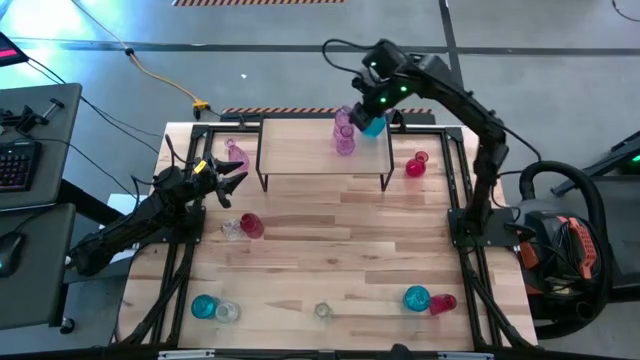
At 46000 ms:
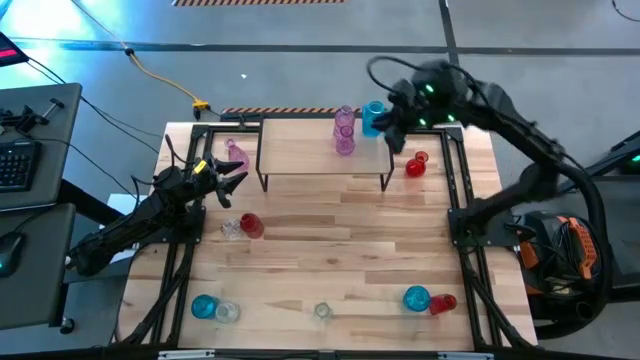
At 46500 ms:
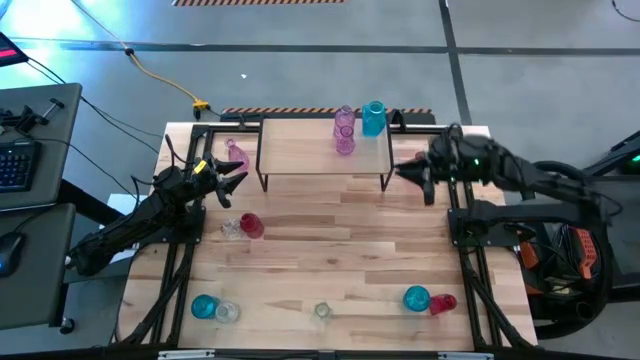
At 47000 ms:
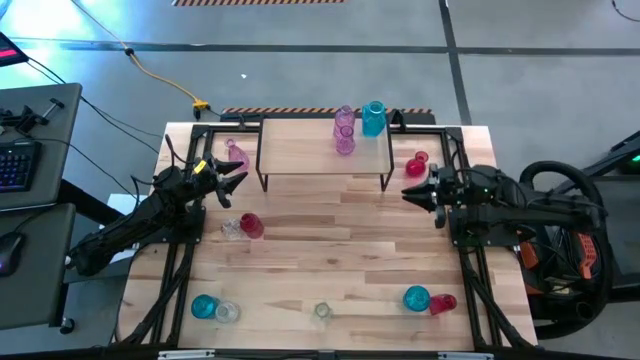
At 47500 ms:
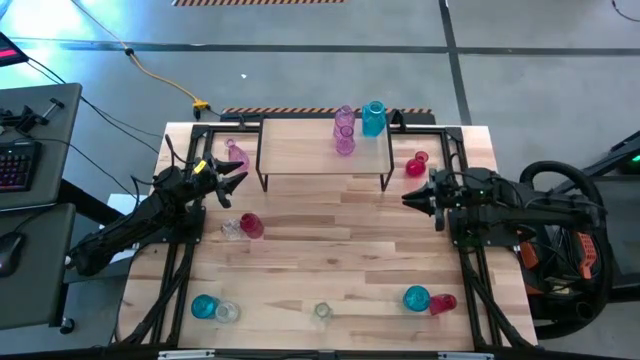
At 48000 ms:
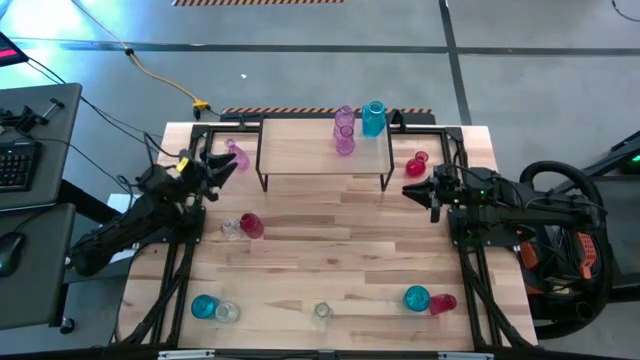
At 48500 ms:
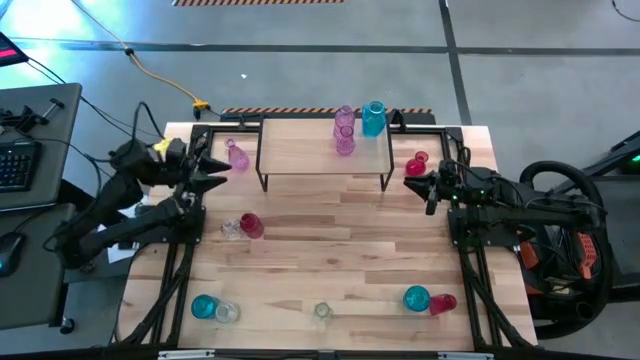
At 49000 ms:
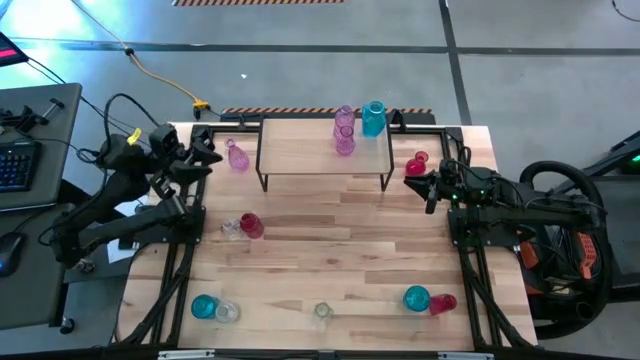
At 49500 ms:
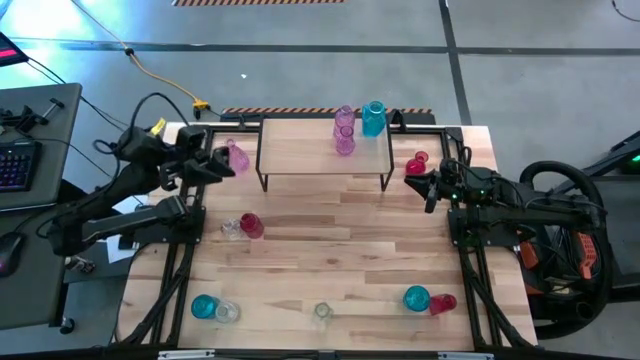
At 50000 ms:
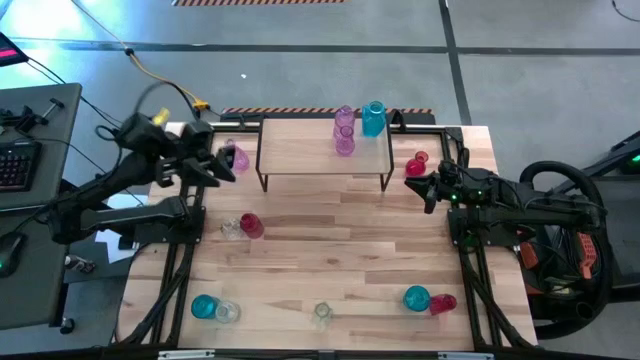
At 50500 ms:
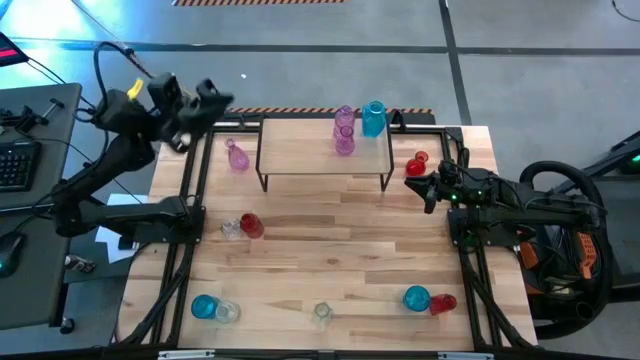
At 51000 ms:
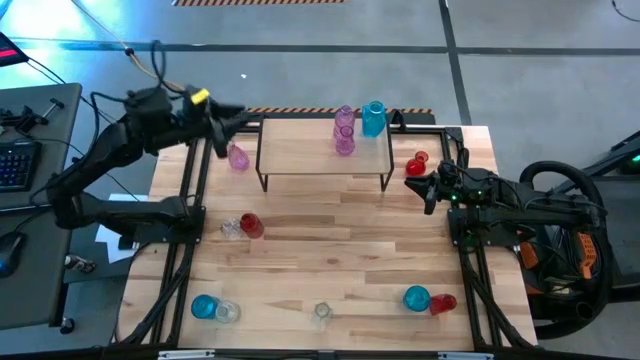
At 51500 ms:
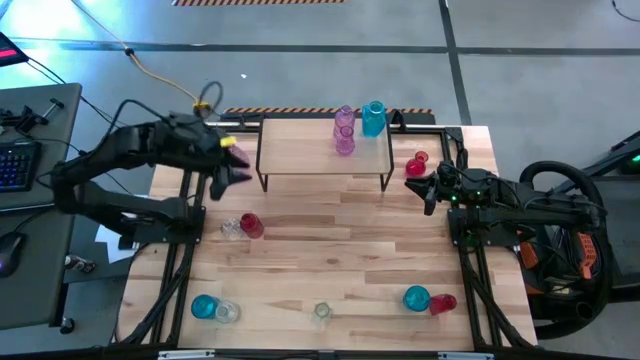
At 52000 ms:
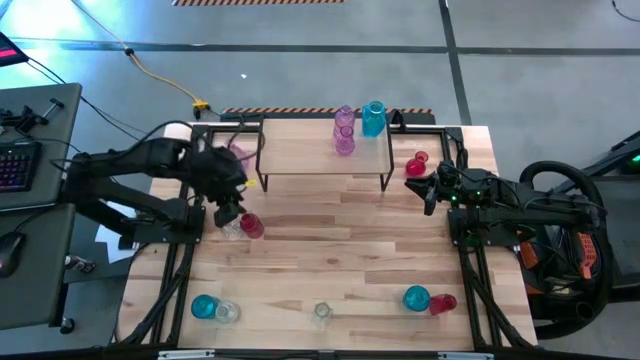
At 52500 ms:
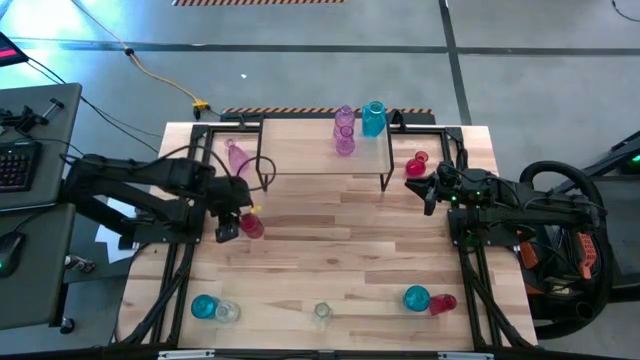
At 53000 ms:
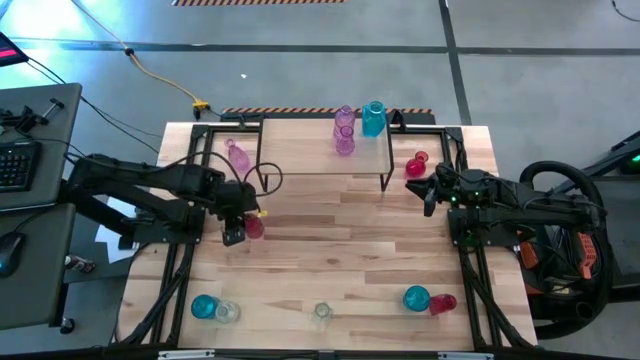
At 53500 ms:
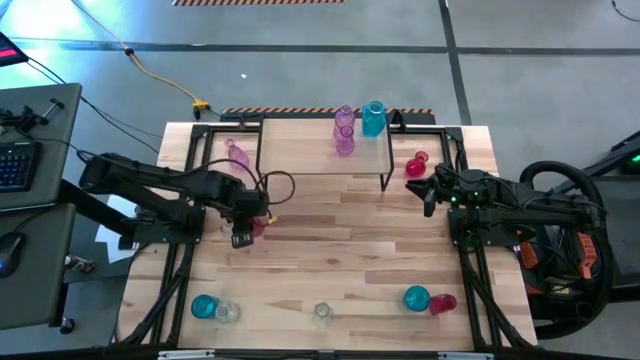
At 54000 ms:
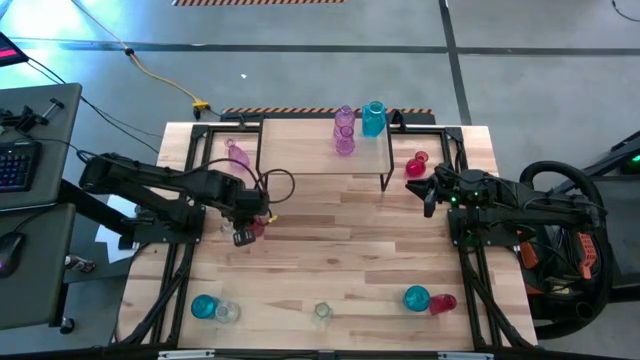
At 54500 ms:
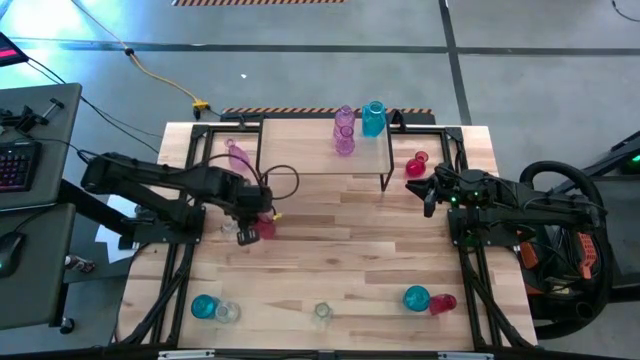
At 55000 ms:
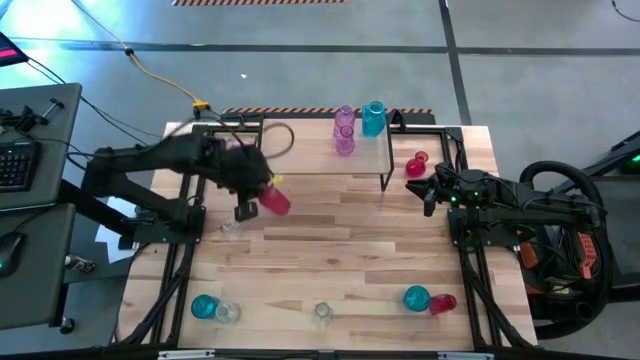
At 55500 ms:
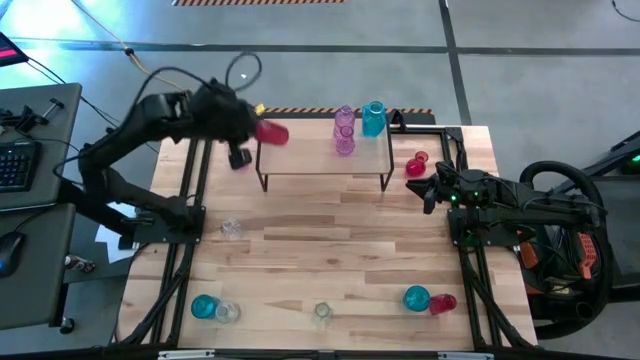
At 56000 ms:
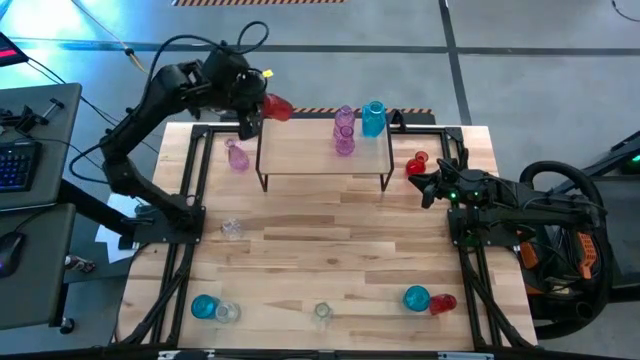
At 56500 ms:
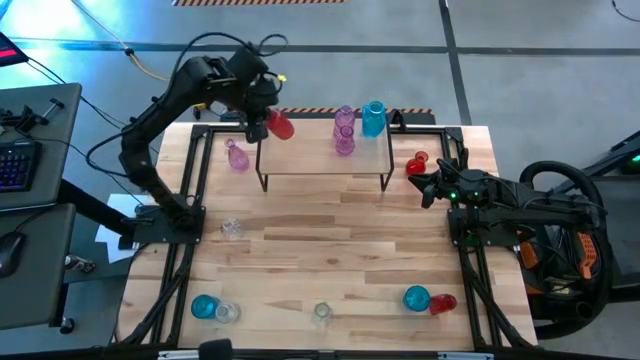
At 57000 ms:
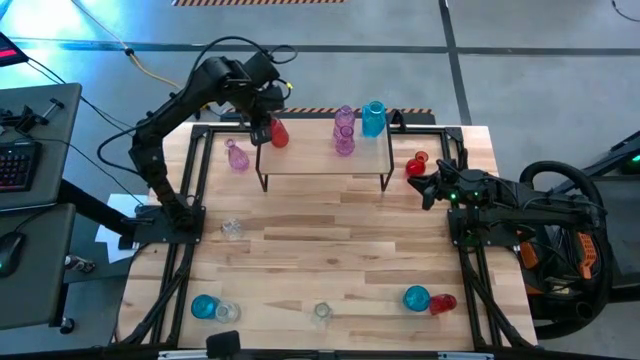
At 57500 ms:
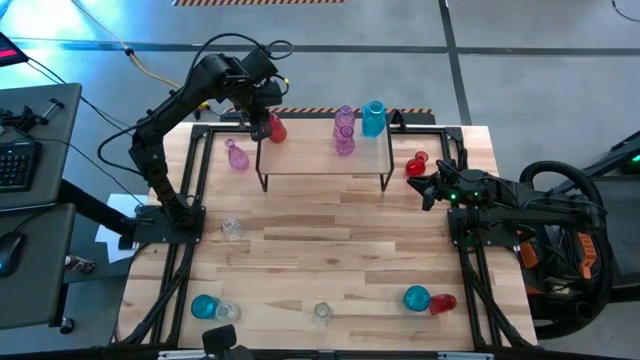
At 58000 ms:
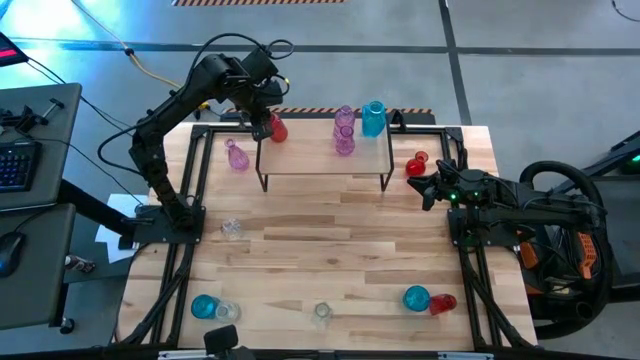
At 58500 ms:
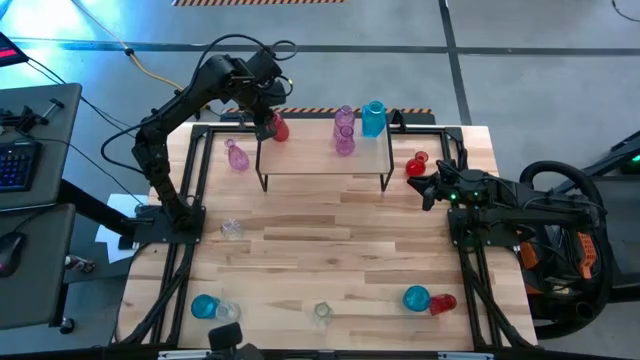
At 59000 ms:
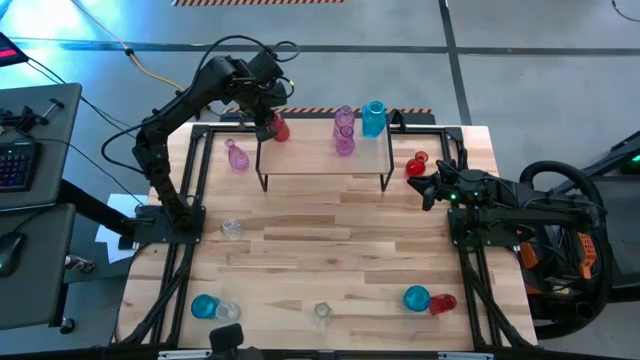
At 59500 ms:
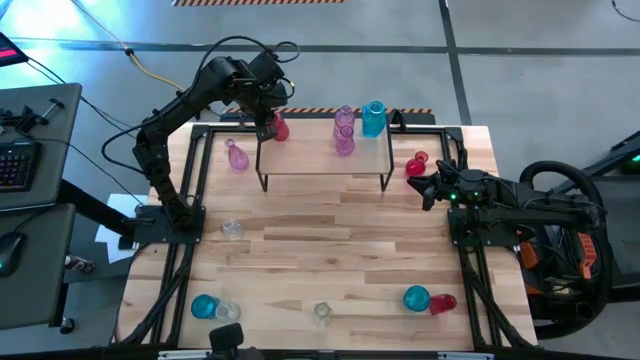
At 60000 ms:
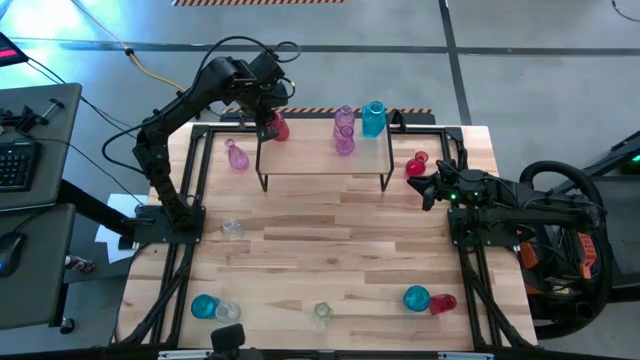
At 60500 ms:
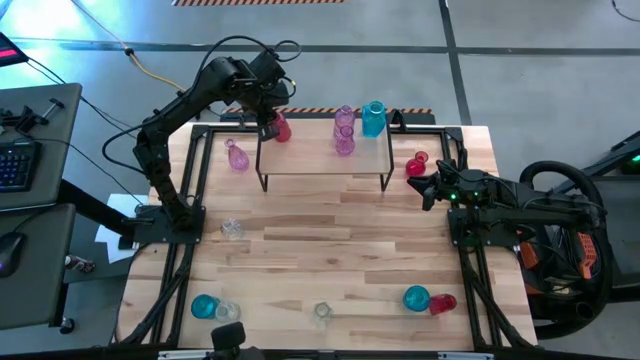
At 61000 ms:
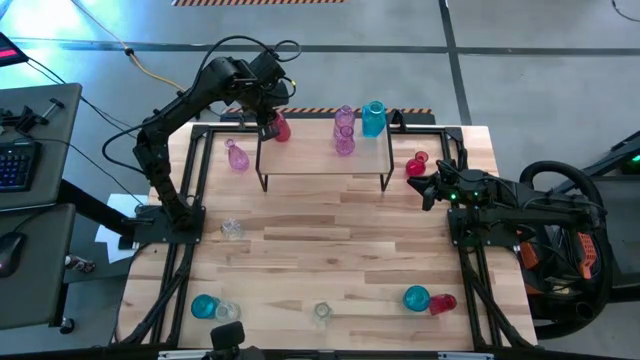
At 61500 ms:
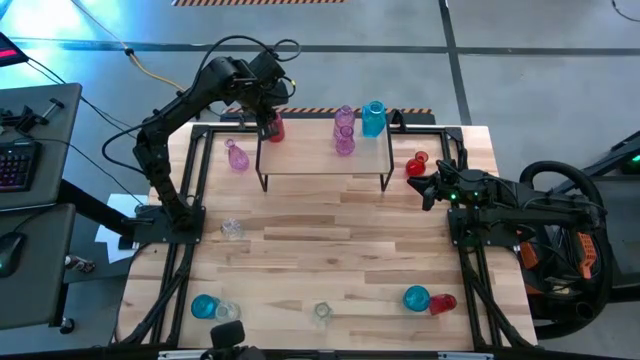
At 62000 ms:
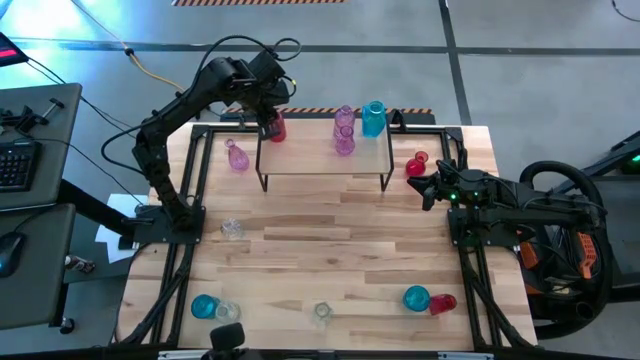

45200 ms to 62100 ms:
Task: sort vases onto shelf
Put the left red vase on the shelf

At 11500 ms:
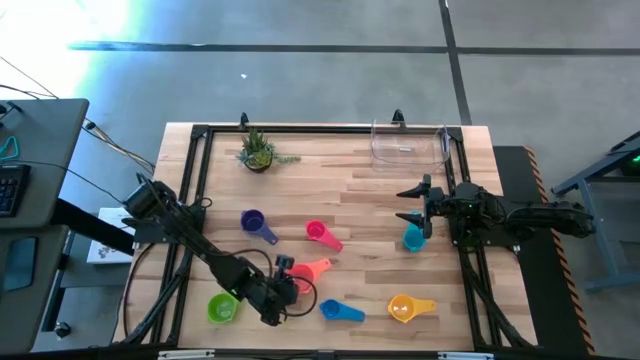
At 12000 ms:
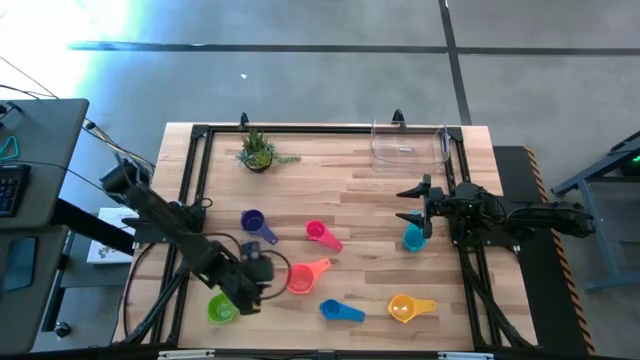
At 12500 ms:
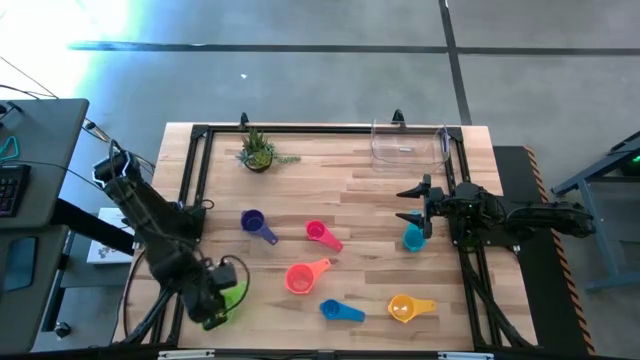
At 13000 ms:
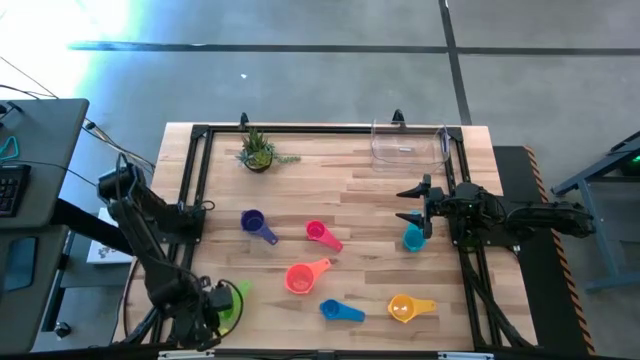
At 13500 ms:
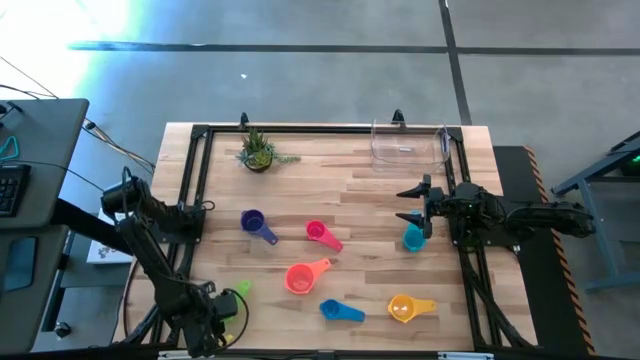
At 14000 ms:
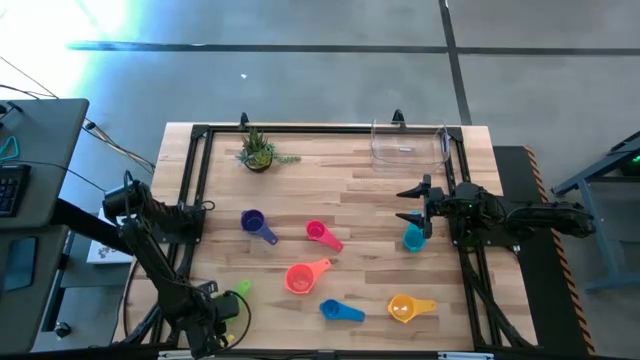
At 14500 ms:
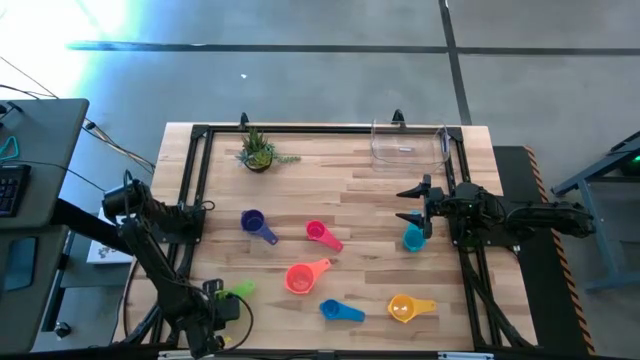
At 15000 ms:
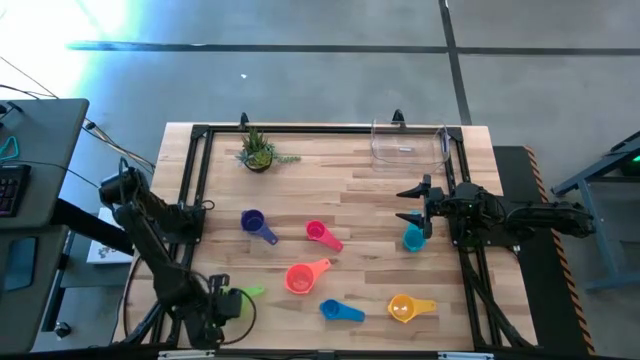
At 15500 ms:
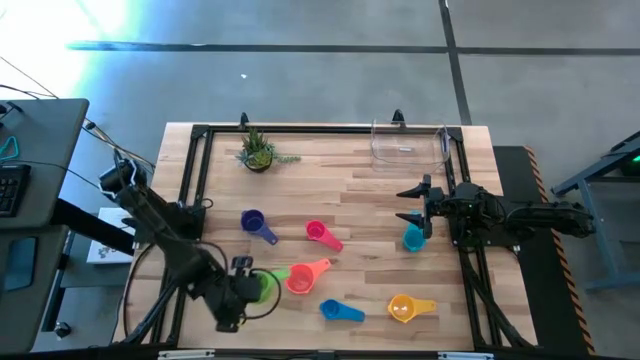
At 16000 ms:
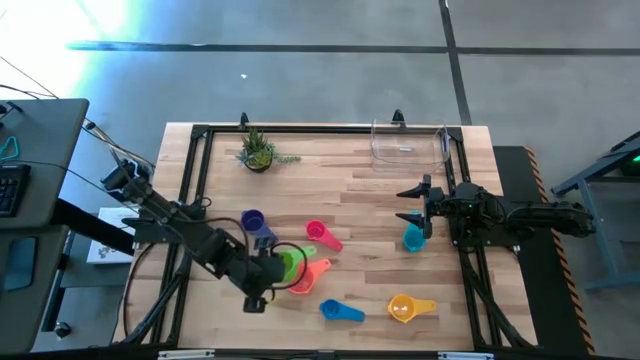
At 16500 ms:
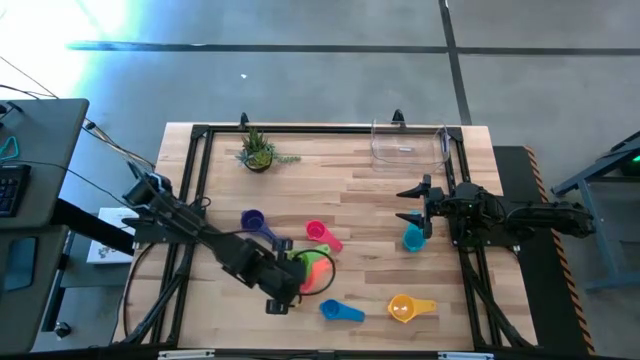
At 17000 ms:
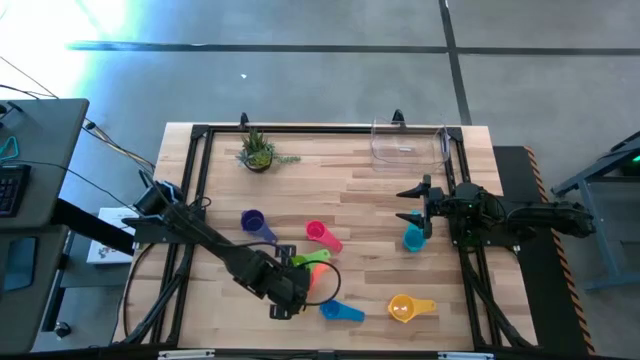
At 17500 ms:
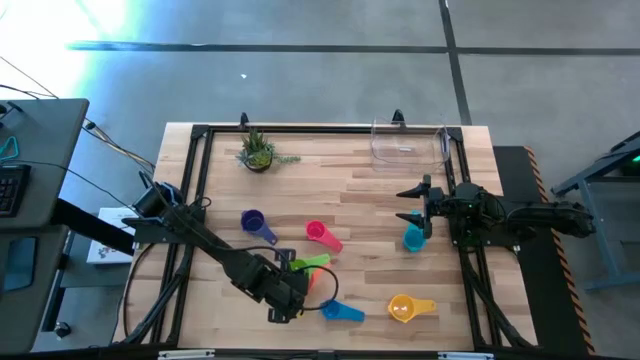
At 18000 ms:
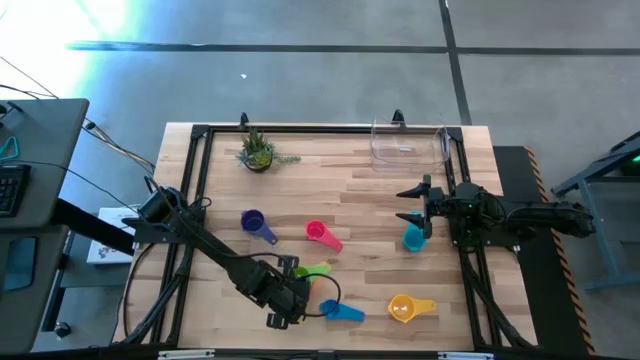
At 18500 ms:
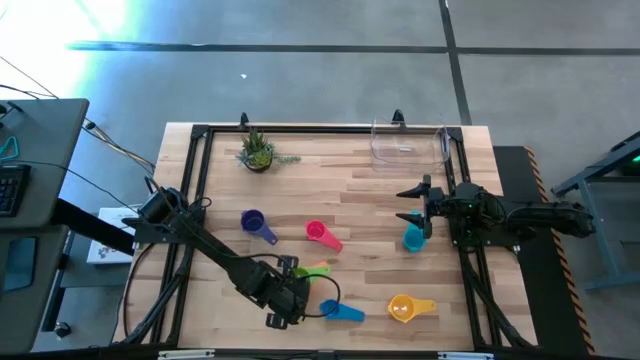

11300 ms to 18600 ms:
Task: Nest measuring cups in basket
Stack the green measuring cup on top of the orange measuring cup
